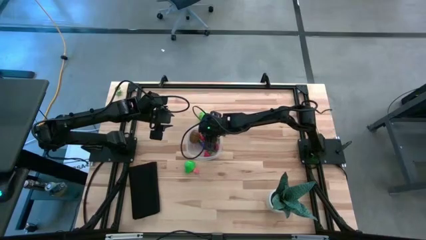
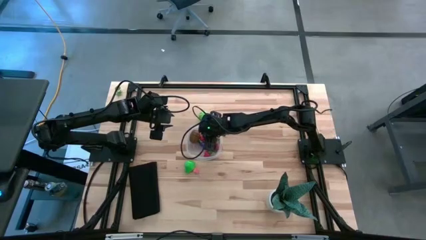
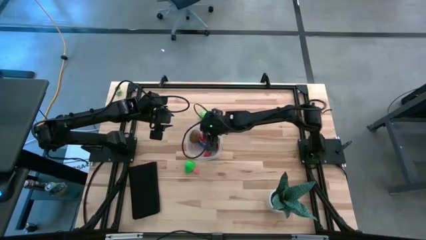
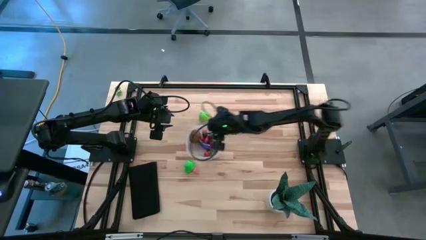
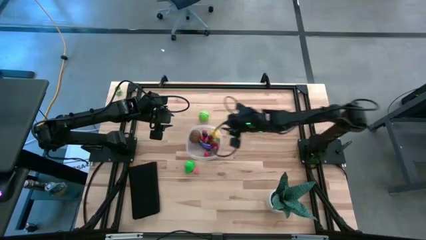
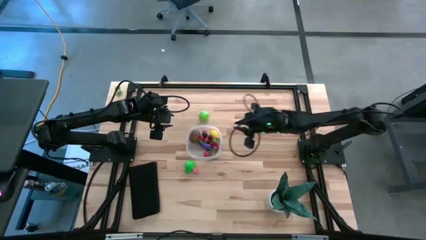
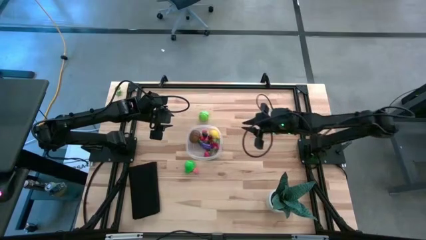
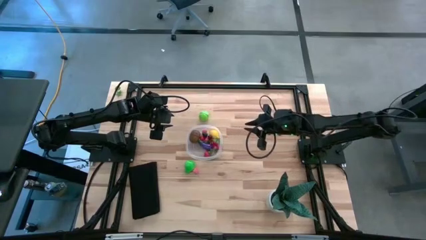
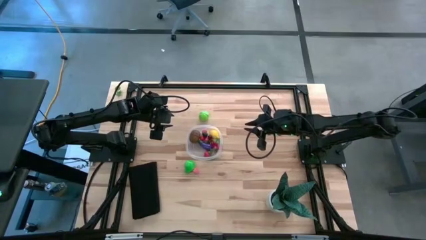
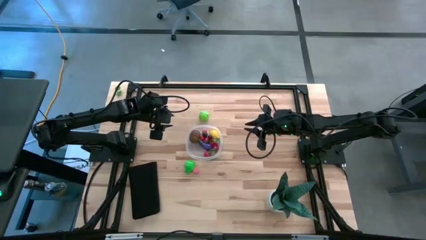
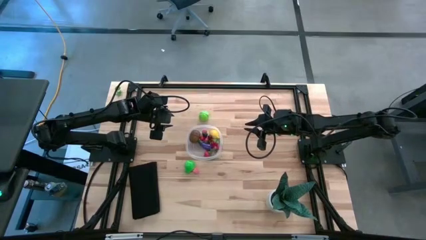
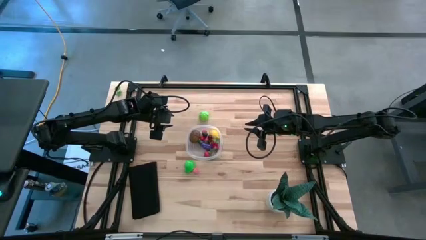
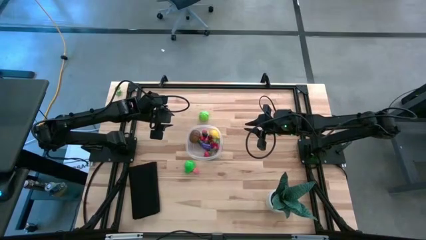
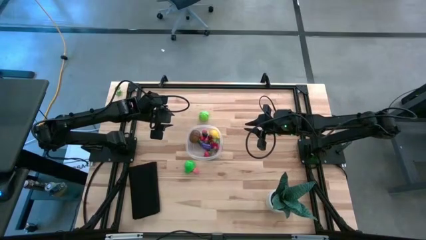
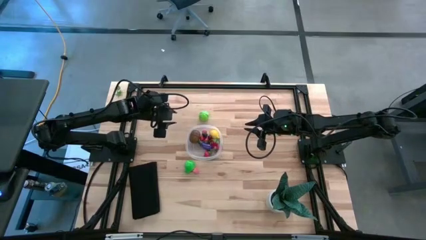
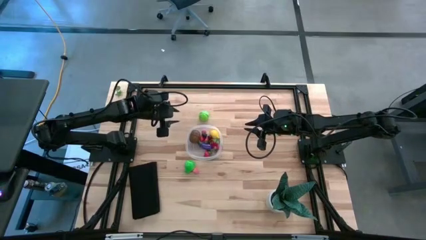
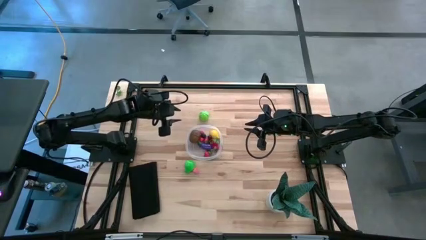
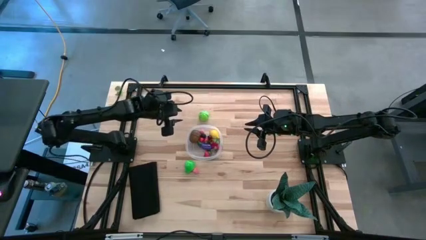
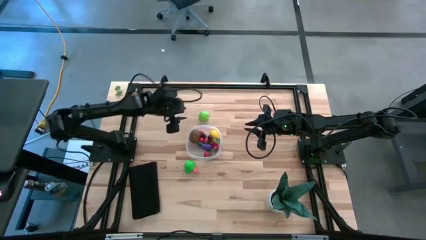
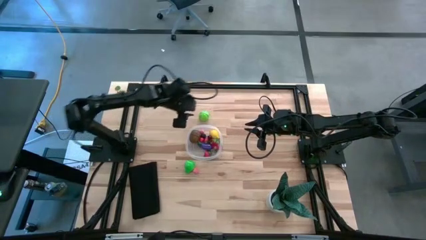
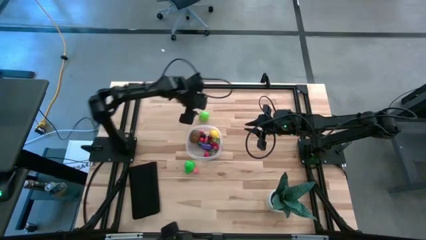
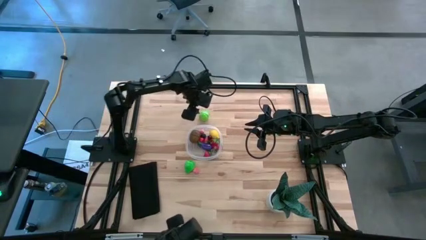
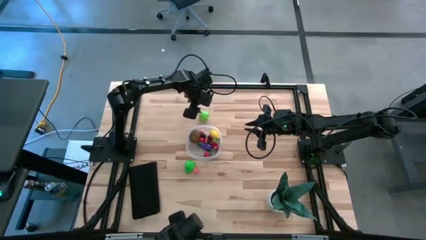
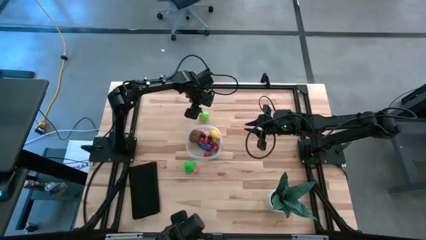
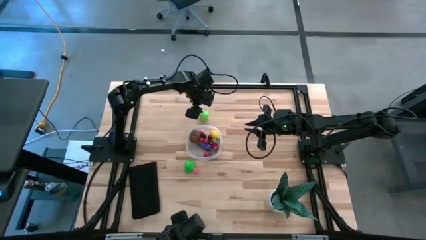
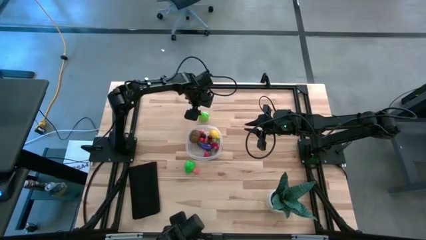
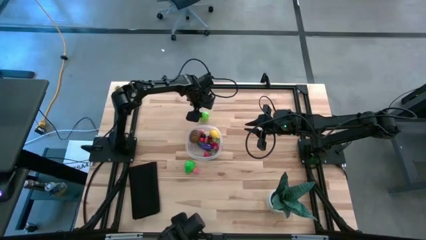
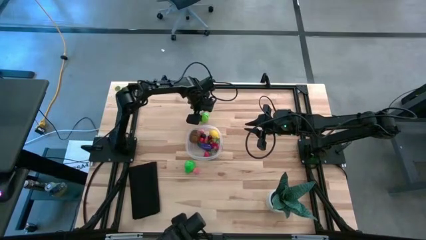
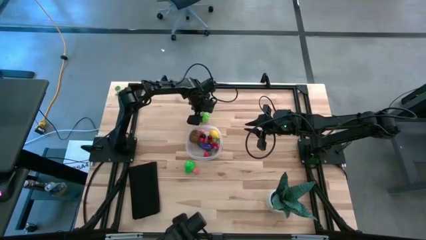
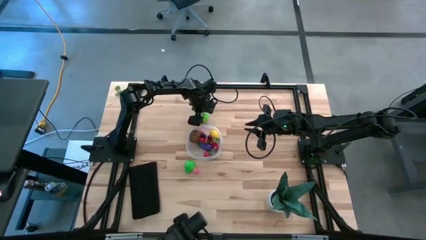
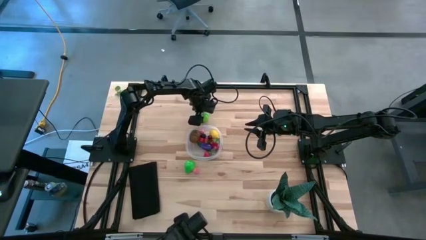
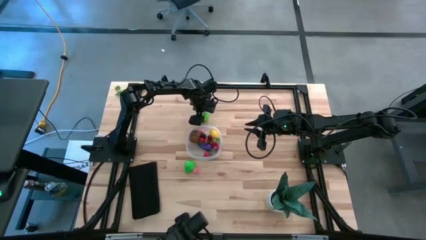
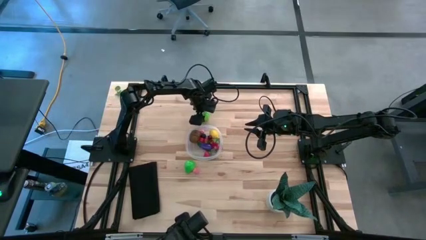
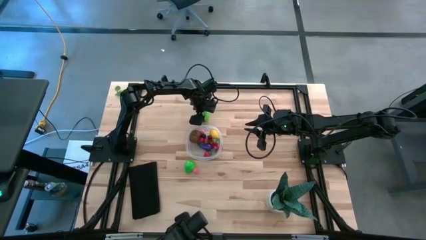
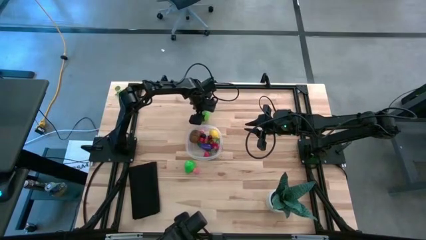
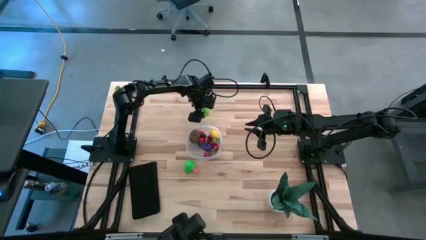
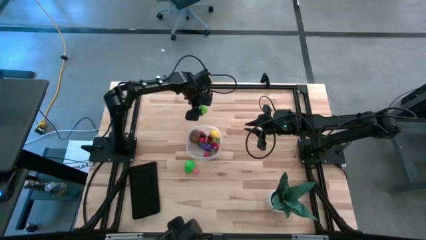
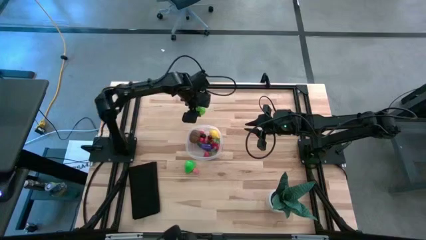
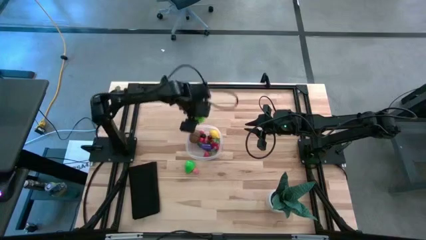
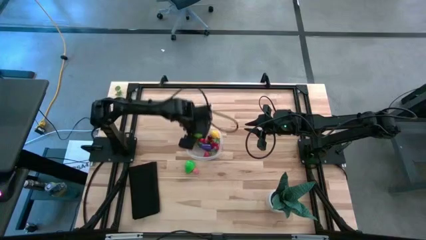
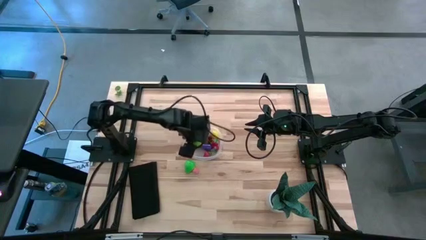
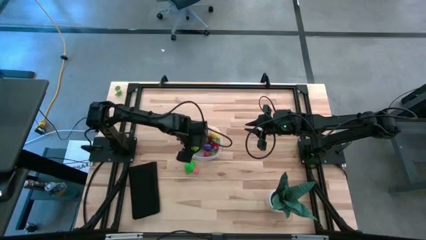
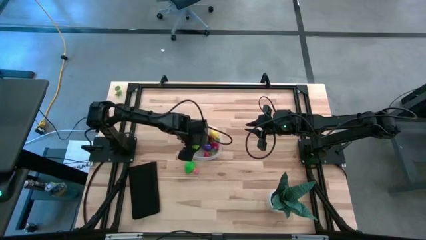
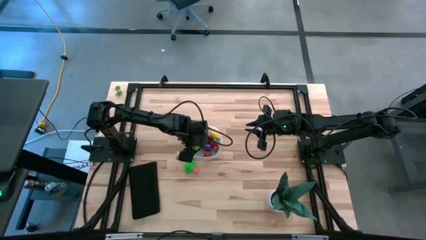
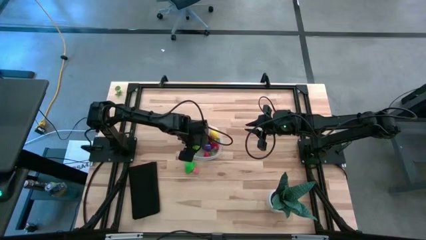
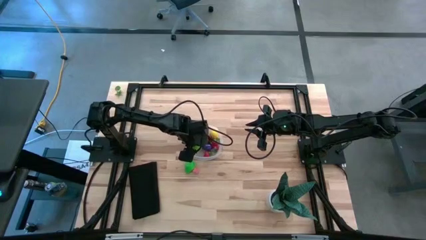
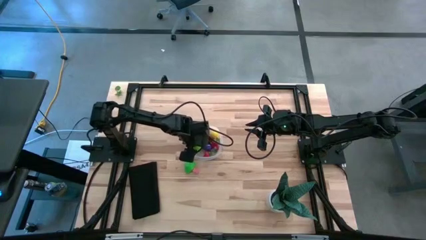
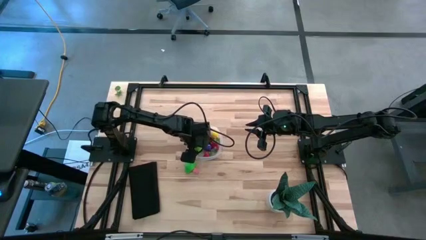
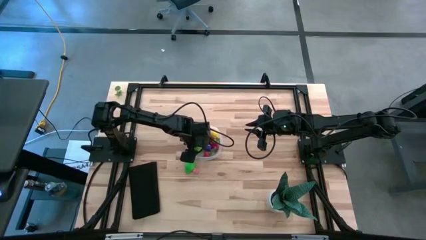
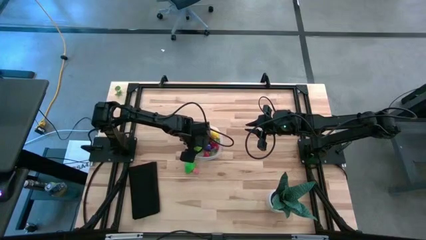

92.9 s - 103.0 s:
Task: Pick and placing Produce into tupperware
Put the cabbage into the transparent bin

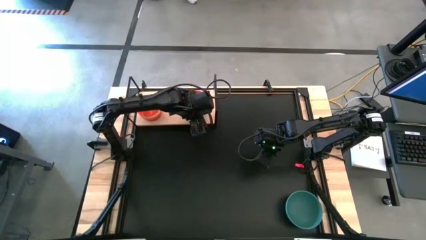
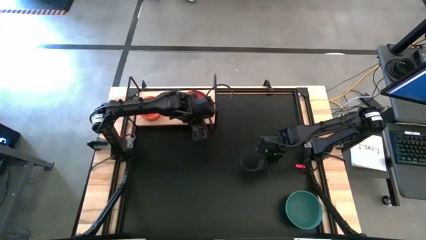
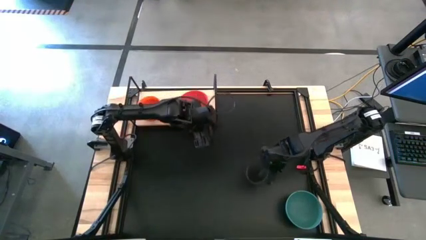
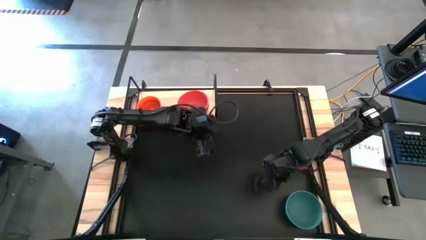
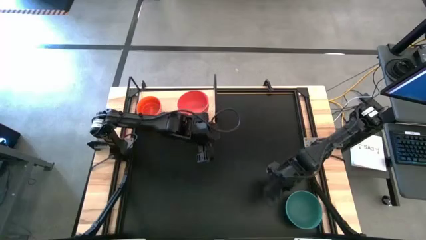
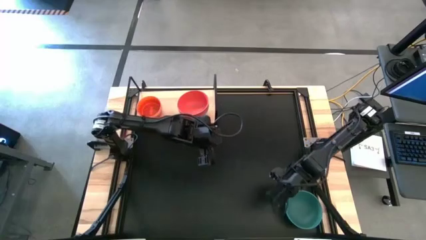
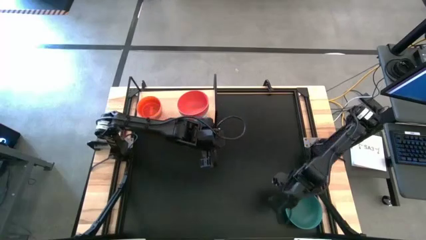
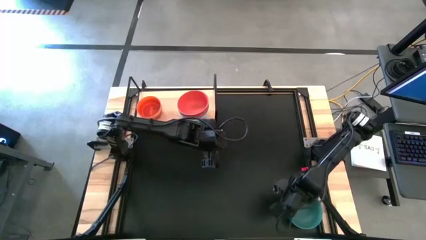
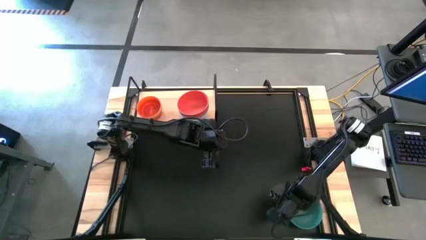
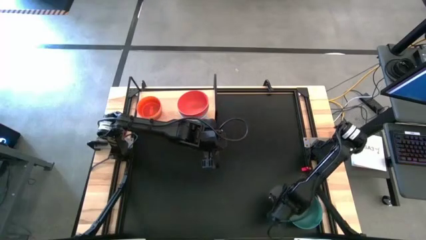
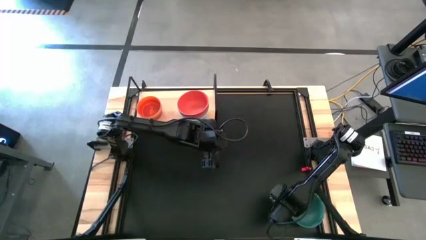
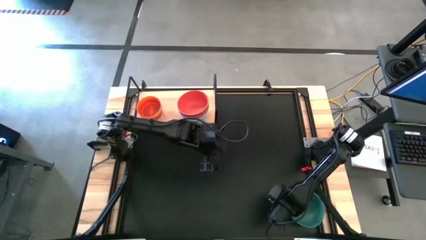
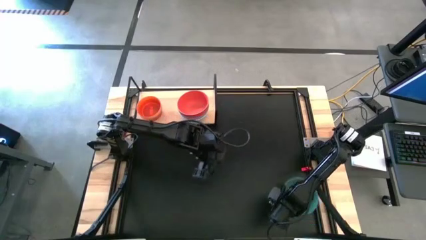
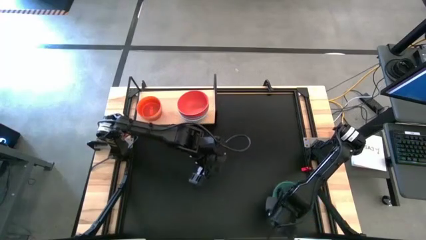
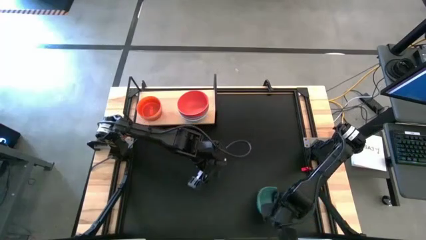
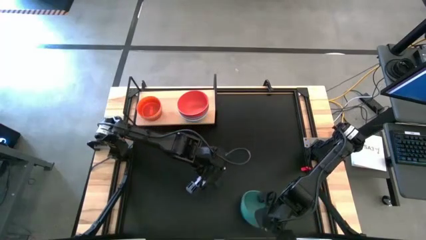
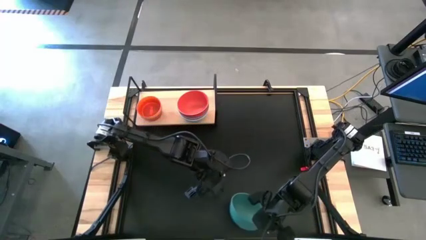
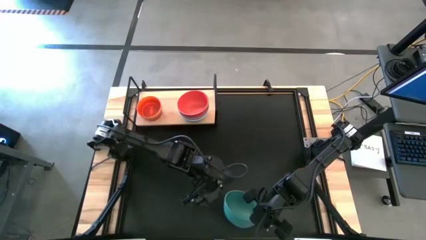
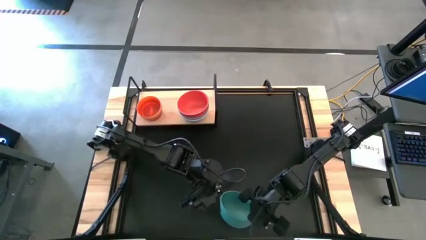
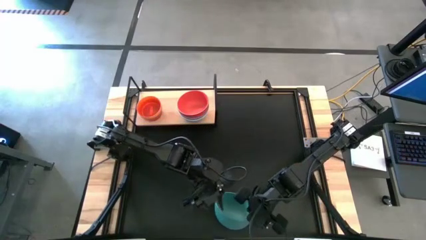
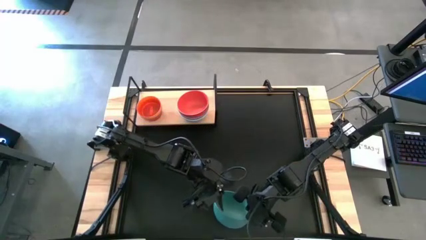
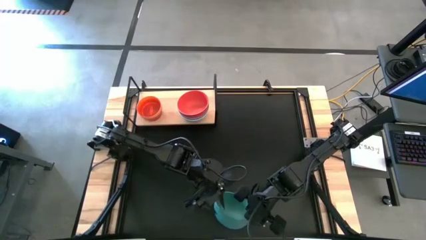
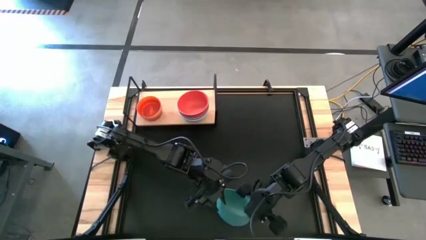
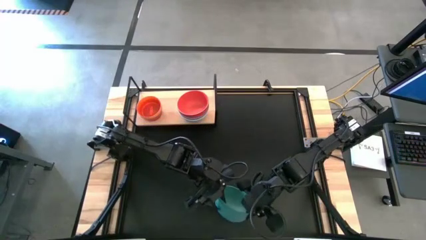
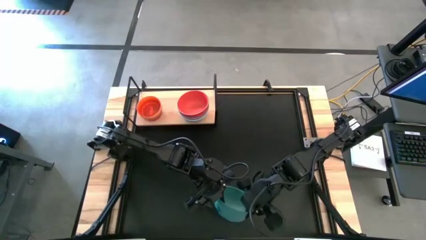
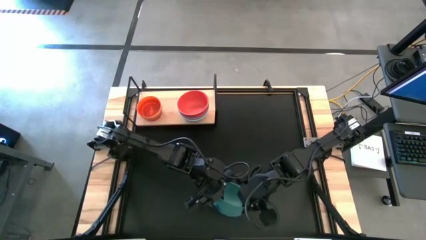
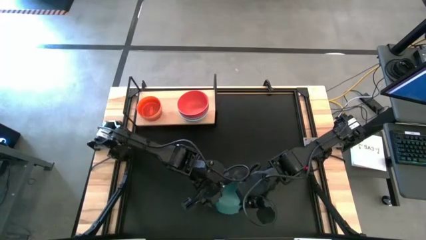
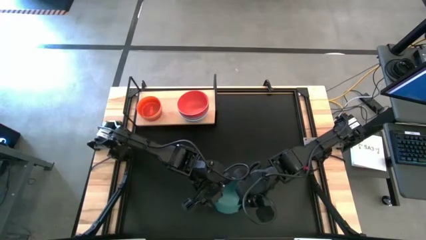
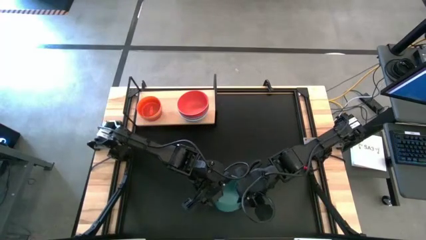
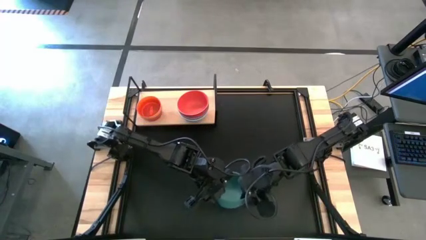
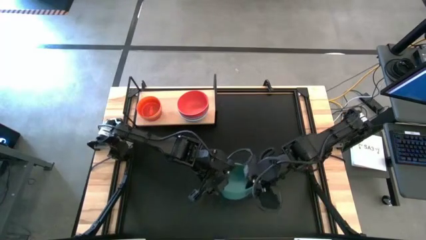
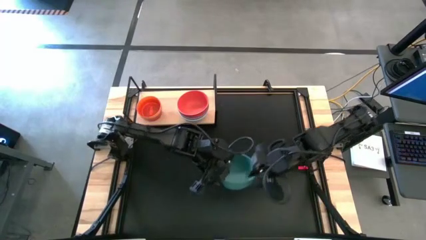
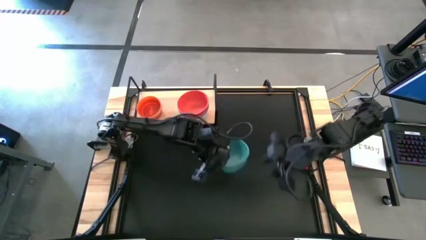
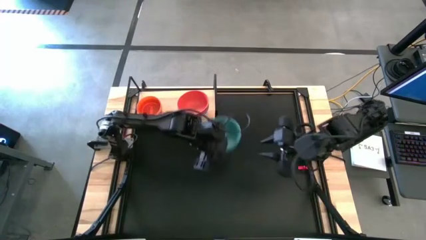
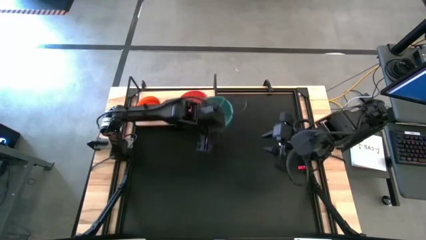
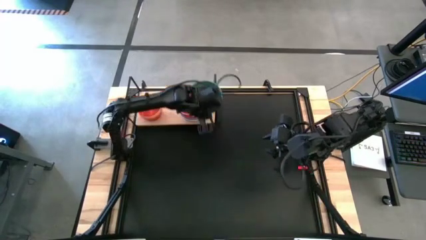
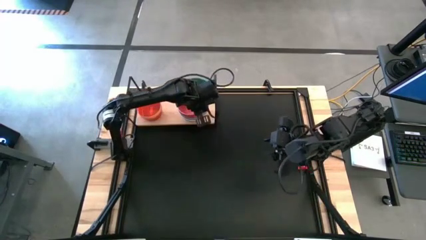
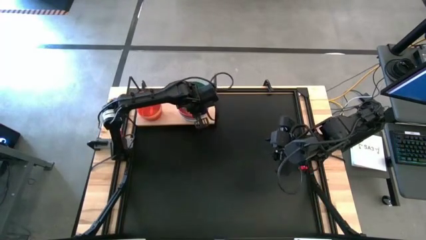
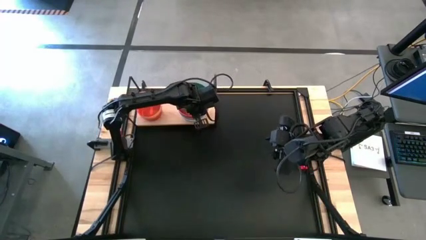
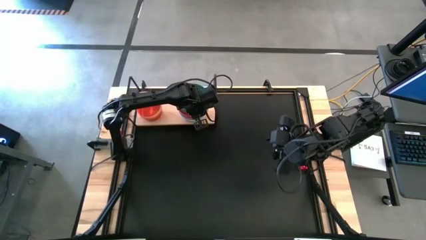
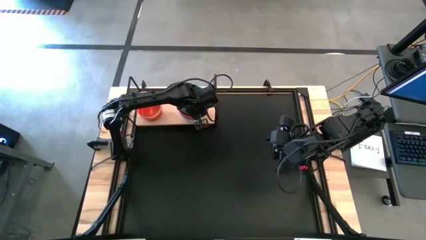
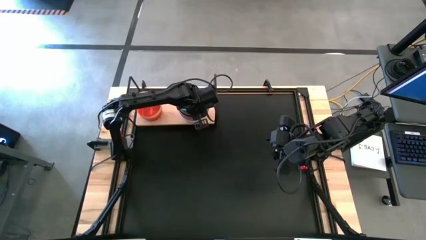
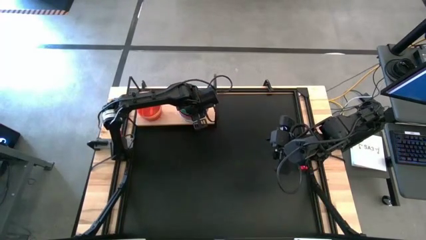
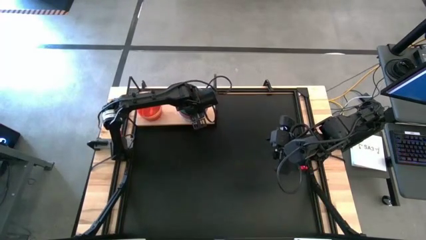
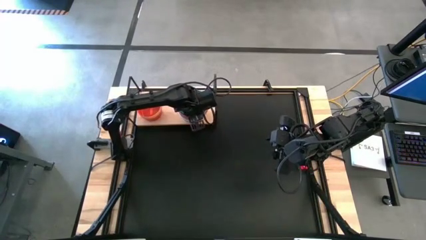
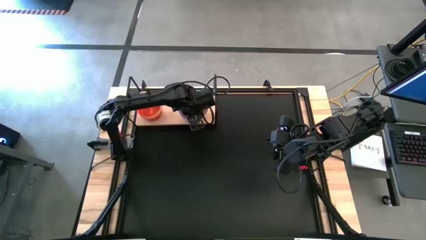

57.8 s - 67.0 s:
Task: Place and stack bowls onto a shelf
Stack the dark green bowl on top of the orange bowl on the shelf
